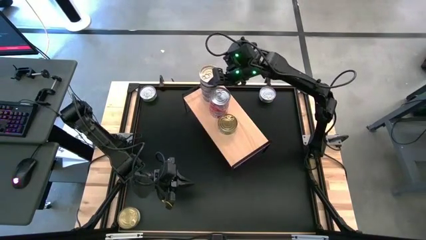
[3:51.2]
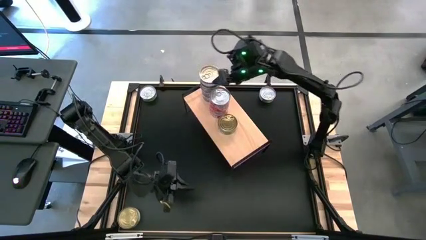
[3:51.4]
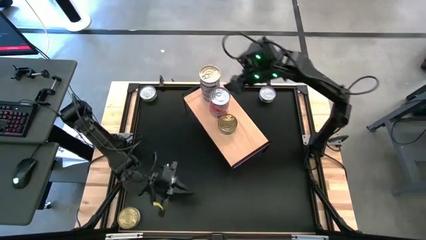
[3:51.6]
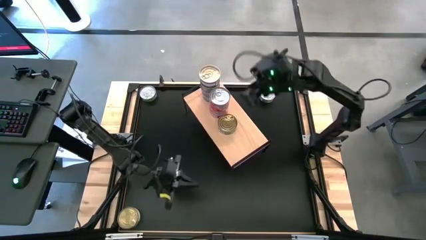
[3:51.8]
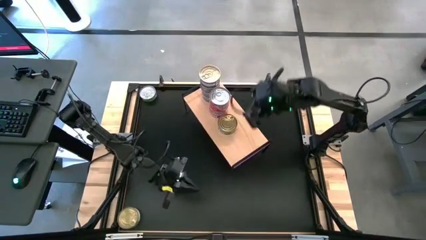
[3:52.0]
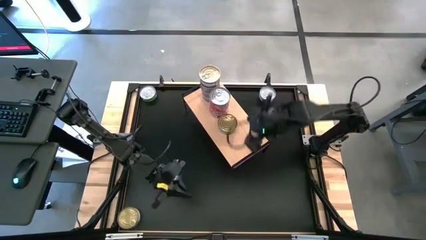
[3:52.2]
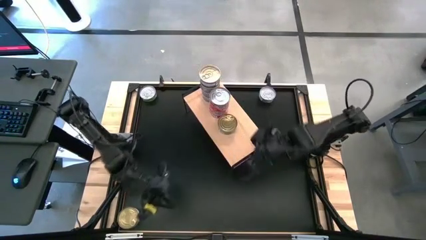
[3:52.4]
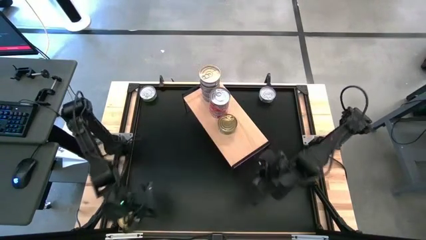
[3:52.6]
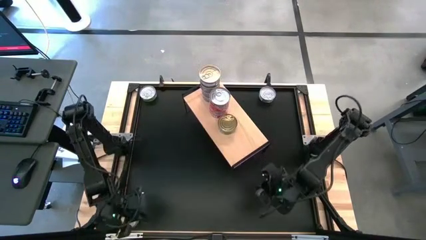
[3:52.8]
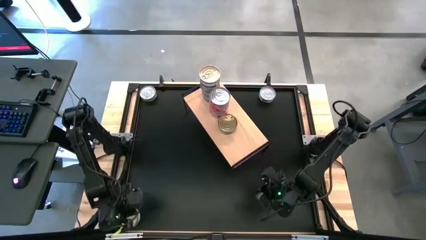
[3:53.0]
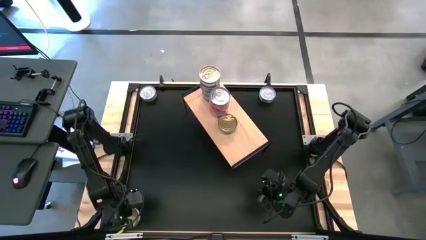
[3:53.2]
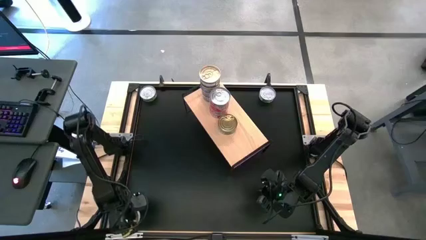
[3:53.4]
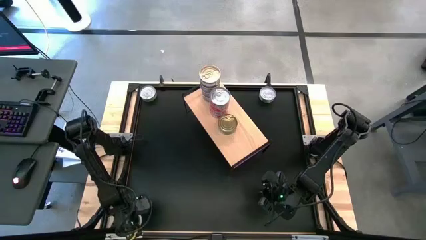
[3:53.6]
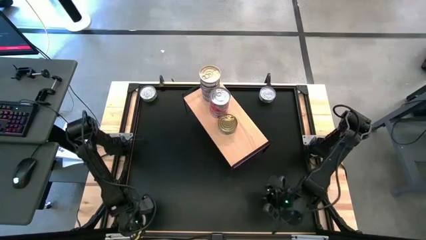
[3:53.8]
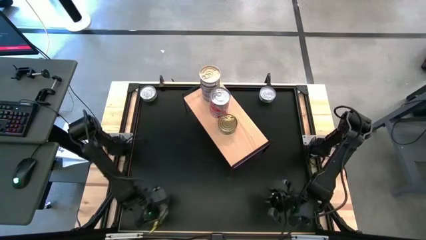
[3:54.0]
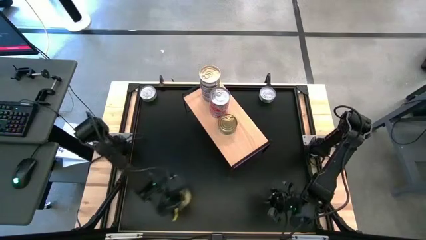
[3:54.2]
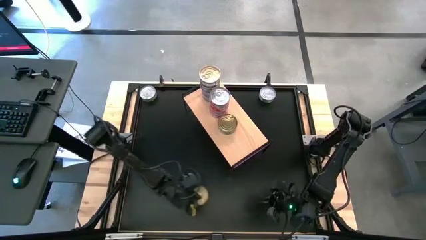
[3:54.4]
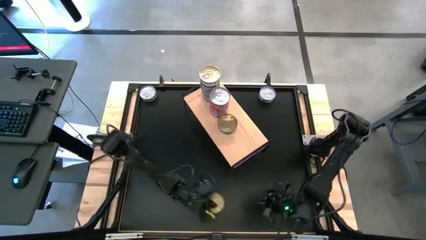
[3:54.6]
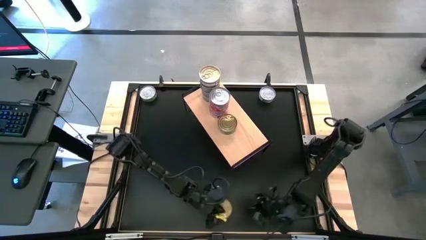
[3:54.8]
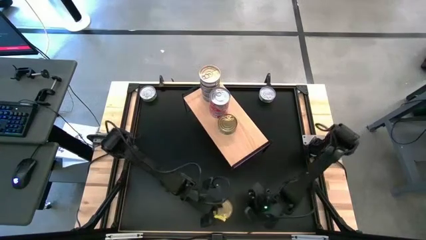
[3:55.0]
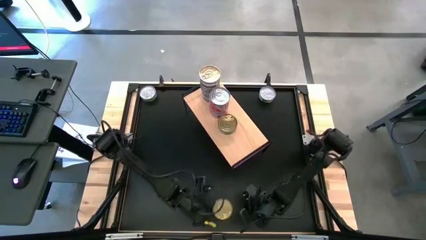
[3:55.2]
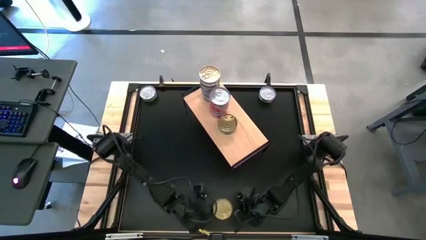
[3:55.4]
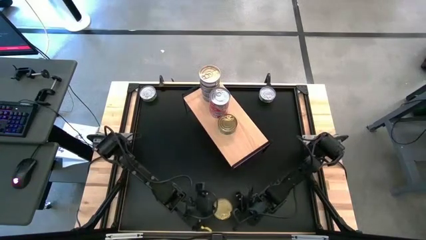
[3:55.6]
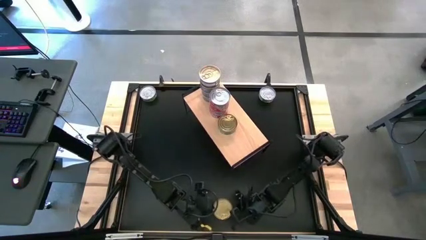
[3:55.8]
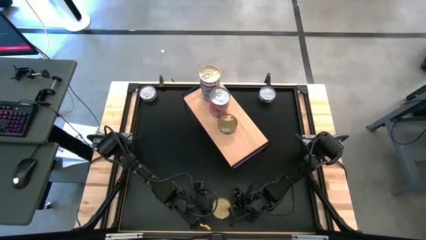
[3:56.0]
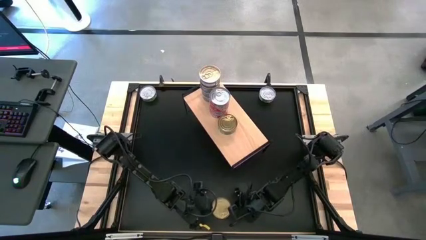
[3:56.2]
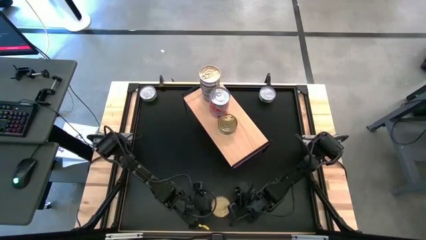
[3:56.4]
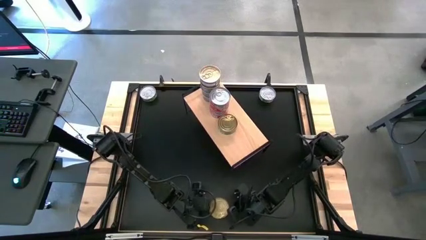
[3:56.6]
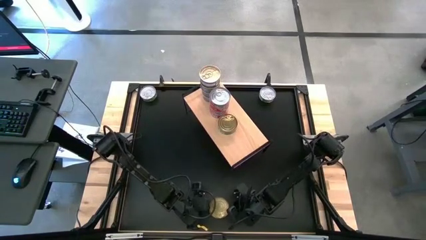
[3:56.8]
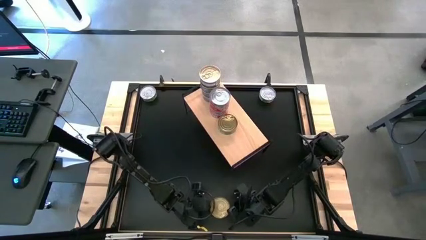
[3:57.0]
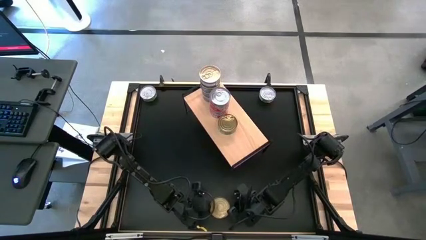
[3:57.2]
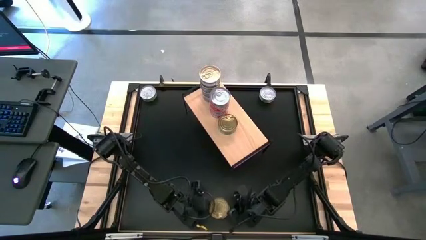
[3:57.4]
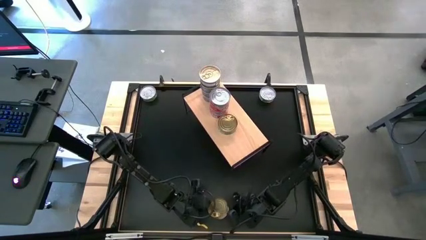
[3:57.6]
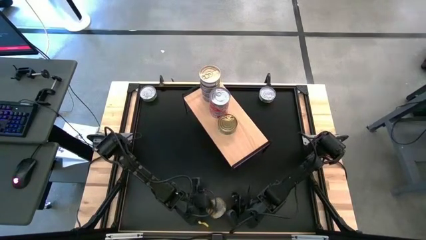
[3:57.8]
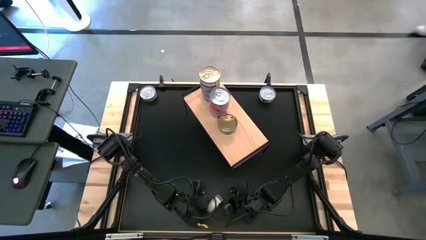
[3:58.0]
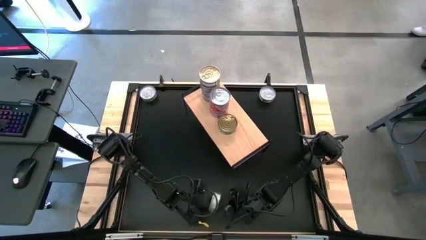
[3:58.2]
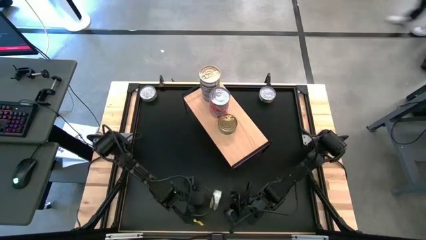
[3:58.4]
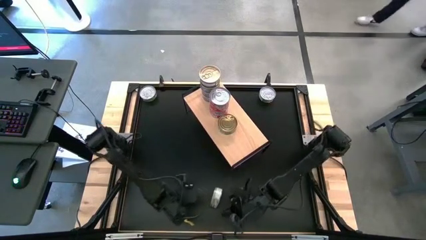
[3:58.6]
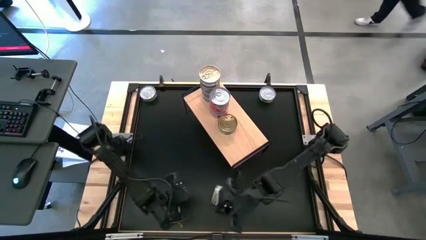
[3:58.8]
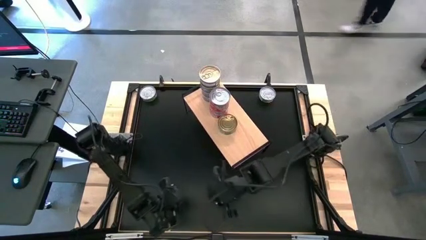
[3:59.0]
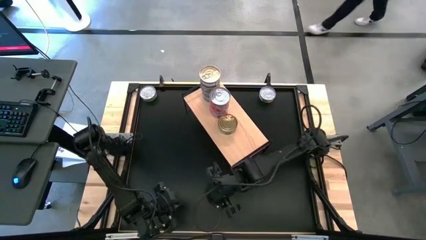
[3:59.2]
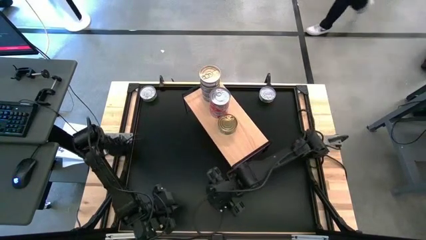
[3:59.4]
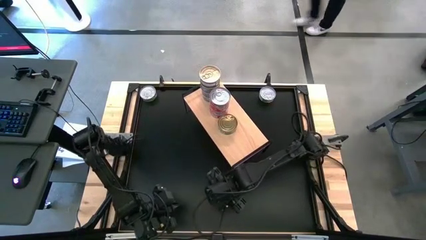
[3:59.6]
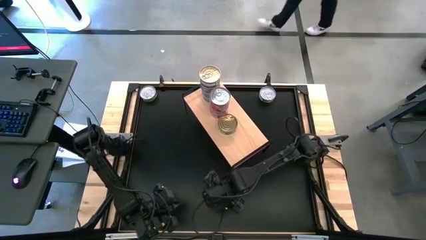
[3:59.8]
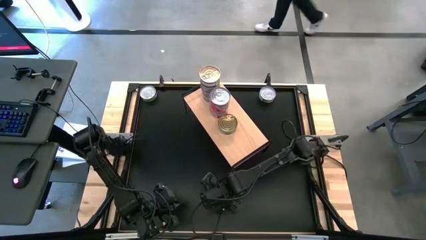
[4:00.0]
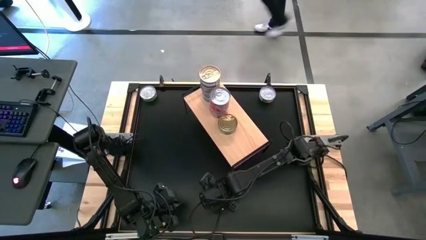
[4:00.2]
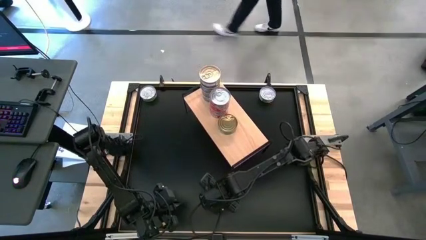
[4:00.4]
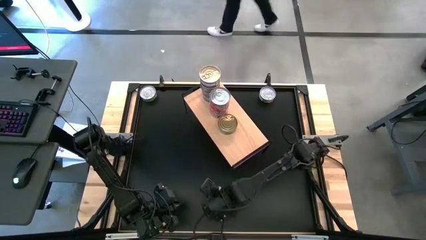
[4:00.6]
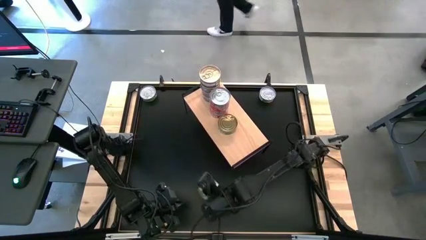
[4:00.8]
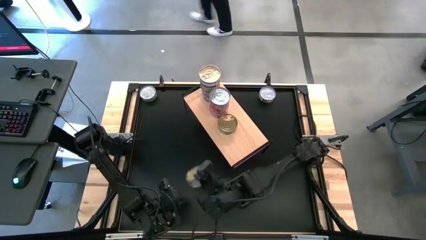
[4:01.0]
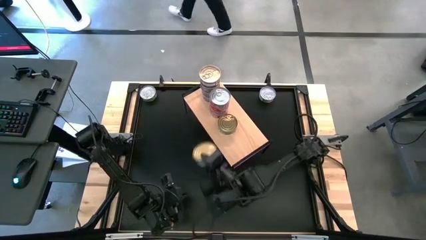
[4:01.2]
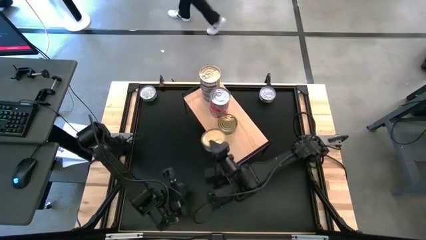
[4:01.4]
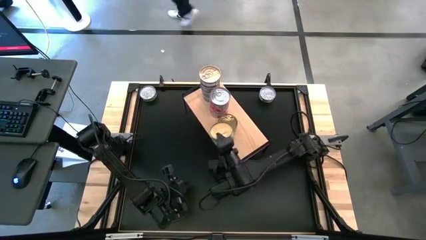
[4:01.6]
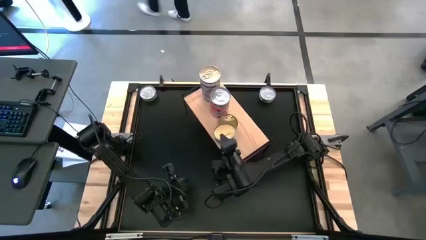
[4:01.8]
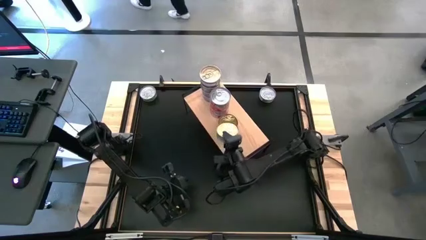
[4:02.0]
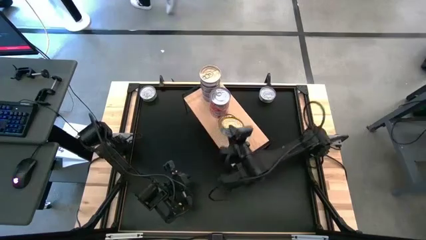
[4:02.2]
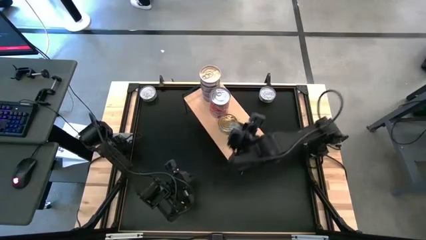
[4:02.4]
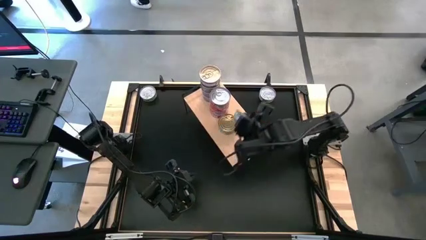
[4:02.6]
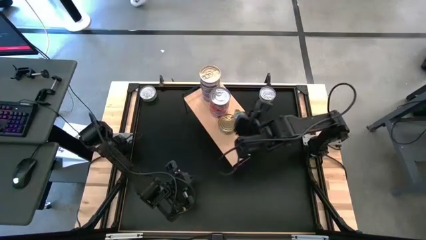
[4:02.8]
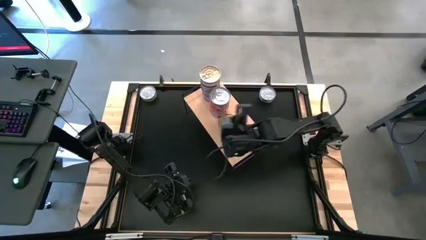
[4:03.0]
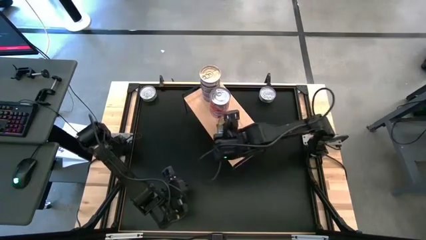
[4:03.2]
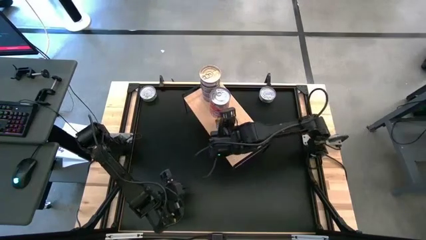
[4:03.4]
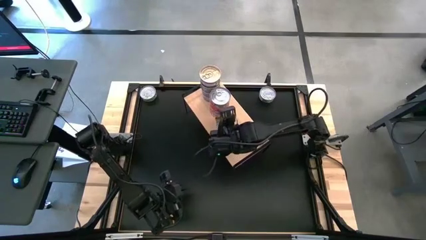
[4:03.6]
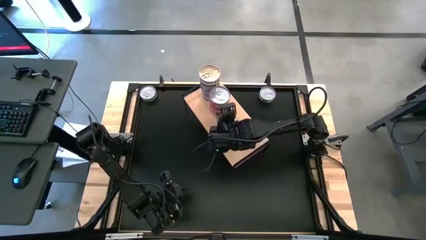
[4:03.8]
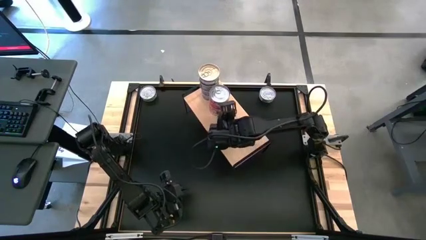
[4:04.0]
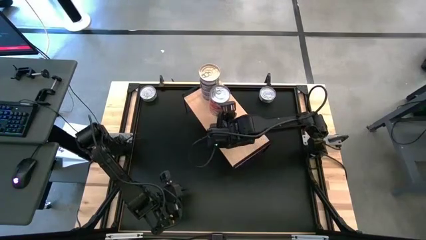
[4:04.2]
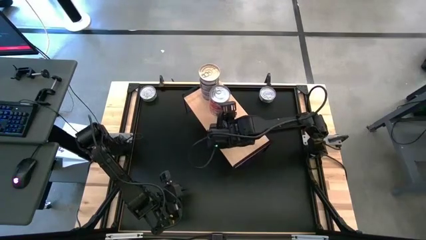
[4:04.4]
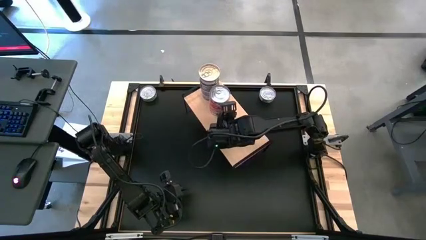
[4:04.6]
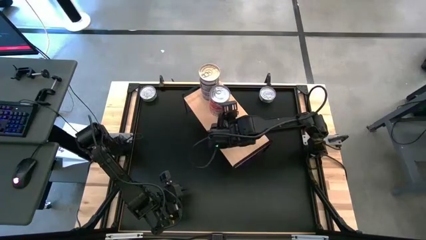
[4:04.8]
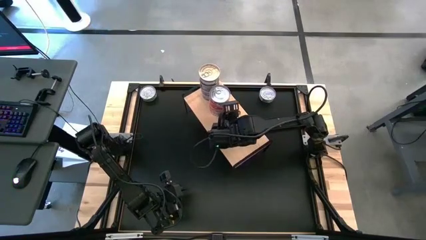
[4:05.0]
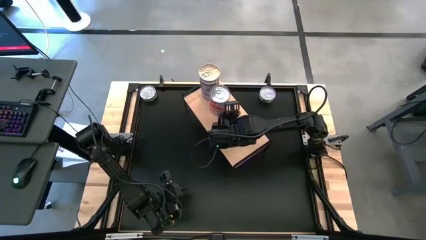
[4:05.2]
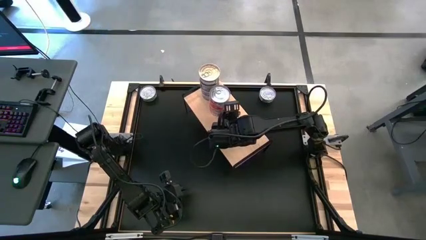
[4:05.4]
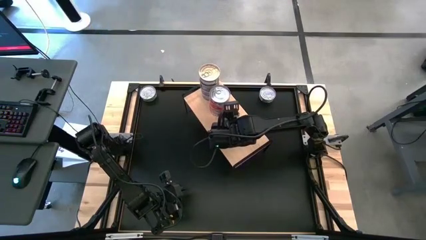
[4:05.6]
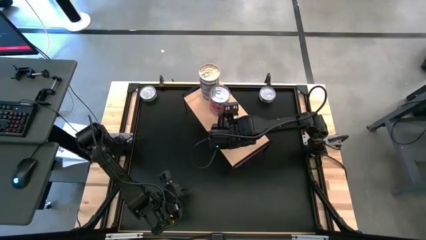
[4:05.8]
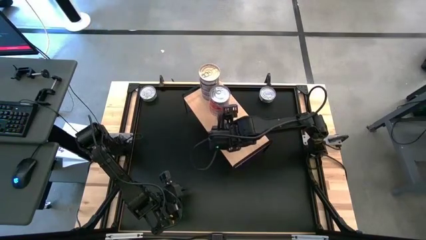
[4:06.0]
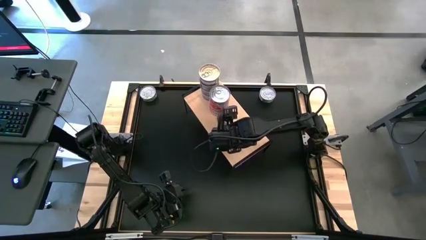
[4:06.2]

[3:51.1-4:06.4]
Task: Stack canned seafood by type on shelf
Stack the green tuna can on top of the green tuna can on the shelf
